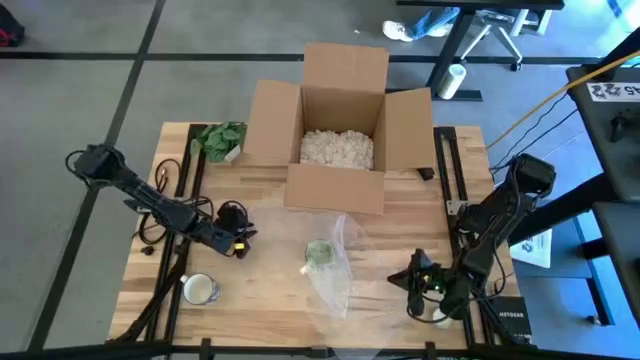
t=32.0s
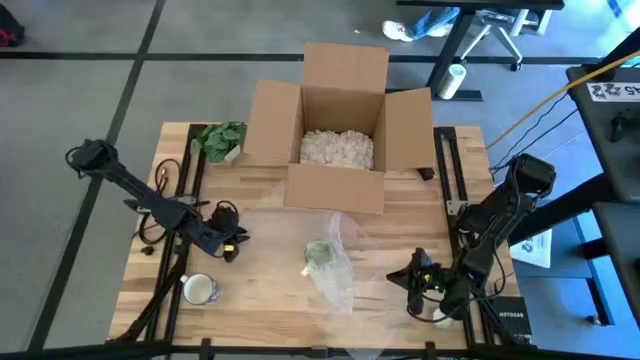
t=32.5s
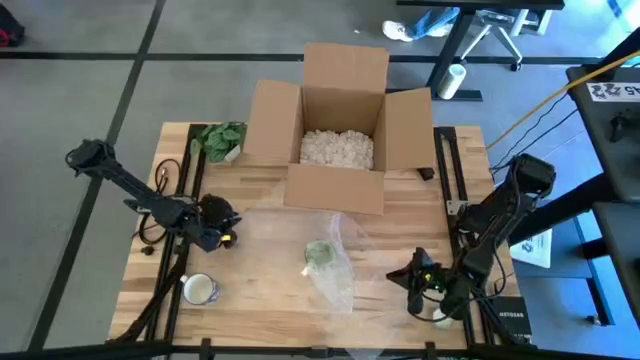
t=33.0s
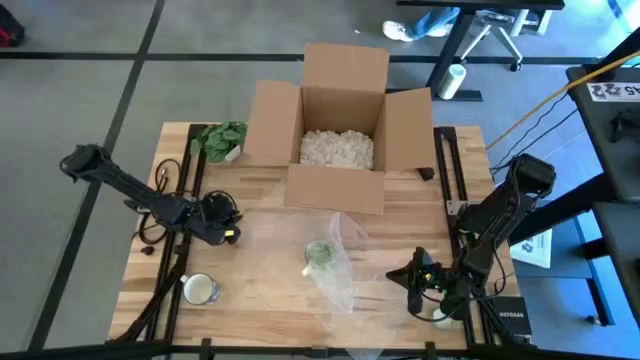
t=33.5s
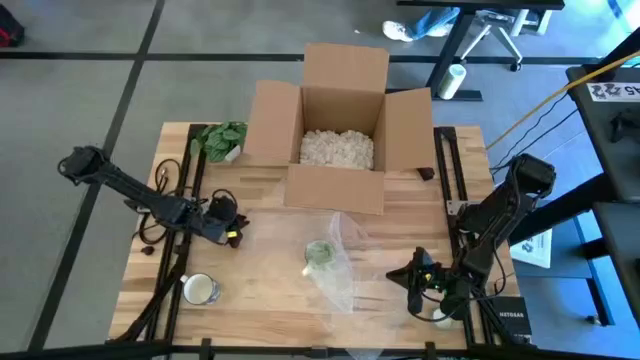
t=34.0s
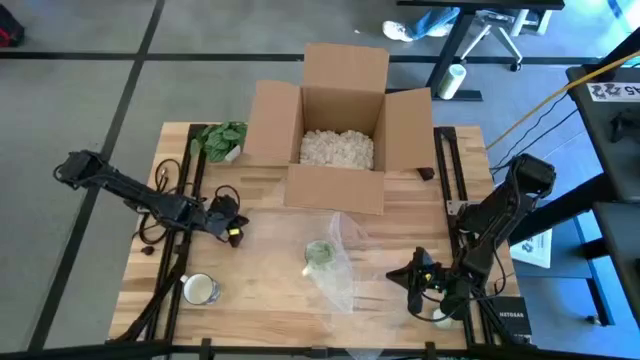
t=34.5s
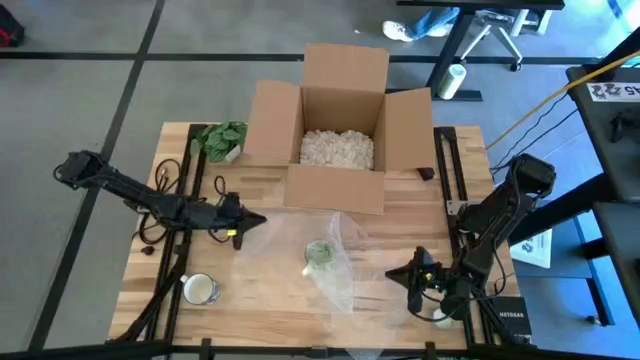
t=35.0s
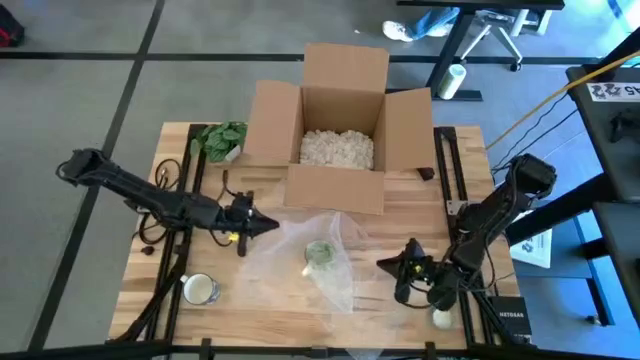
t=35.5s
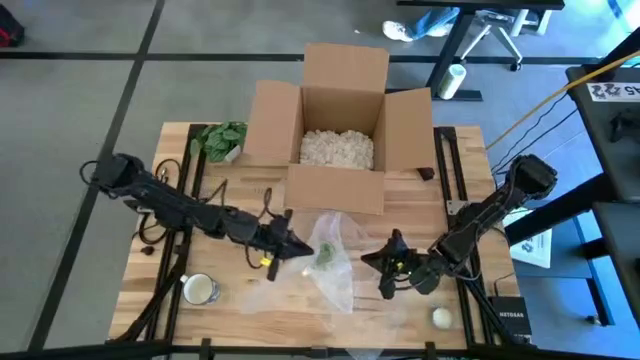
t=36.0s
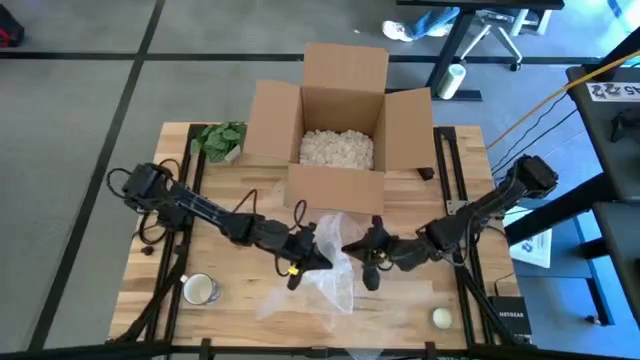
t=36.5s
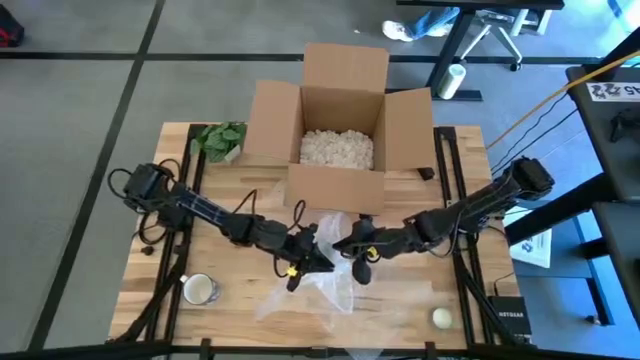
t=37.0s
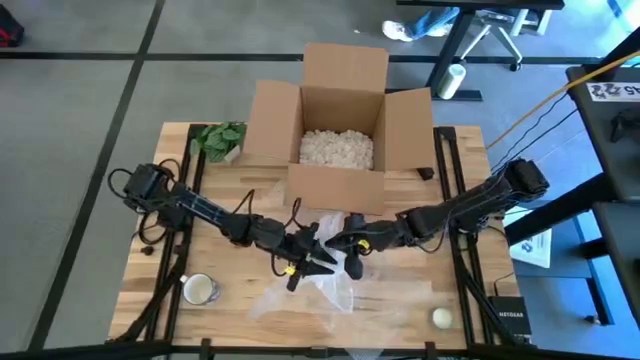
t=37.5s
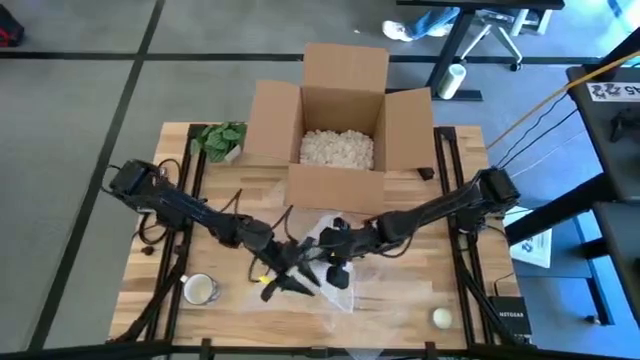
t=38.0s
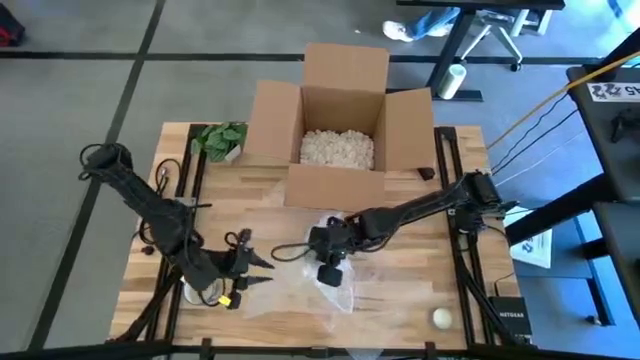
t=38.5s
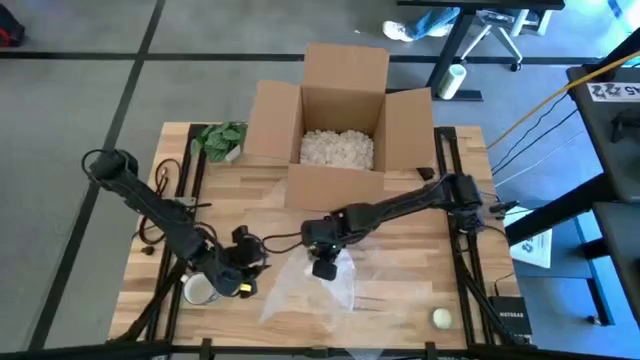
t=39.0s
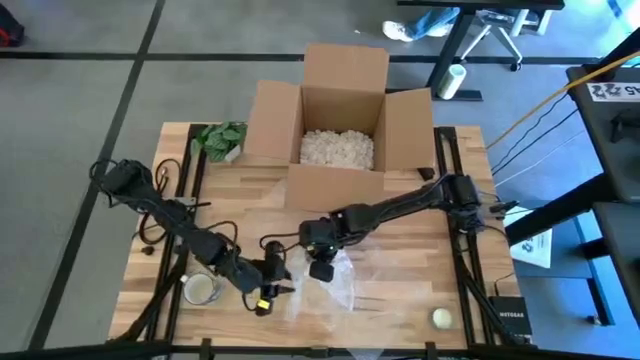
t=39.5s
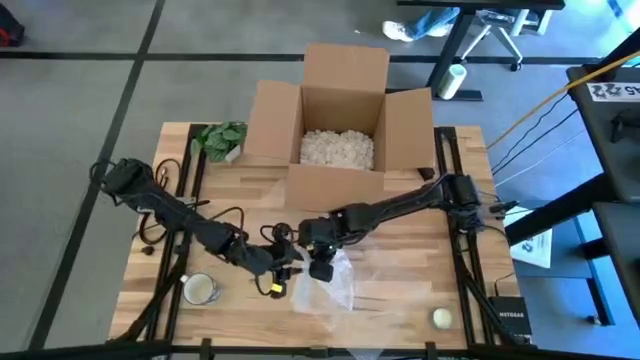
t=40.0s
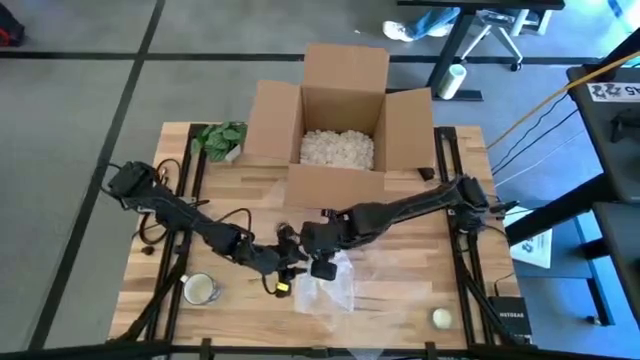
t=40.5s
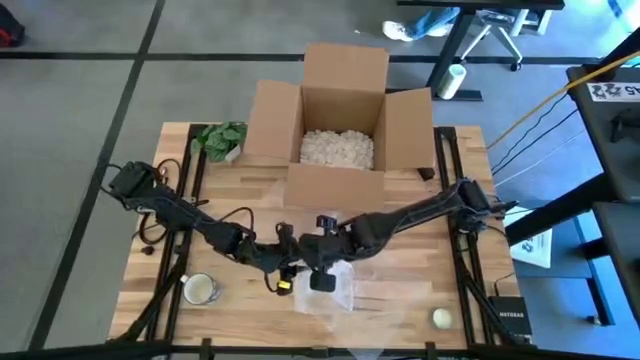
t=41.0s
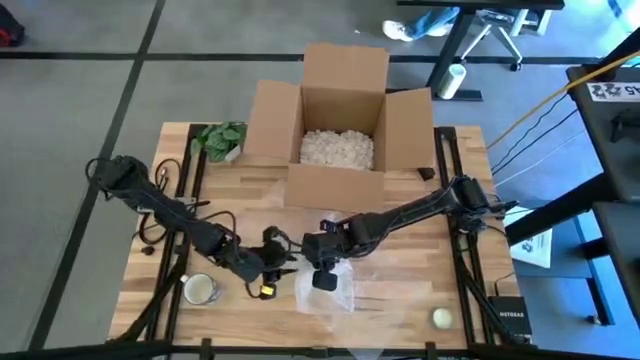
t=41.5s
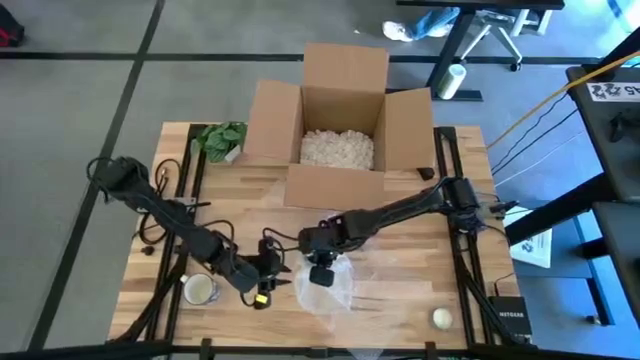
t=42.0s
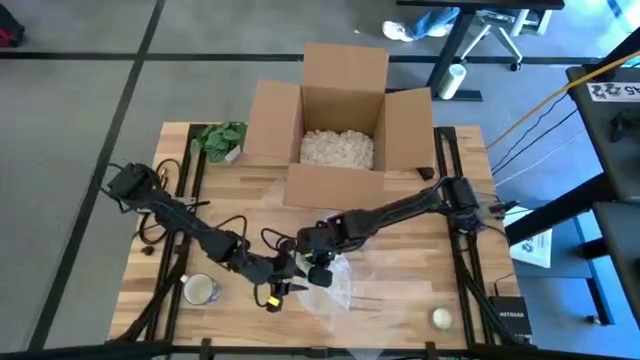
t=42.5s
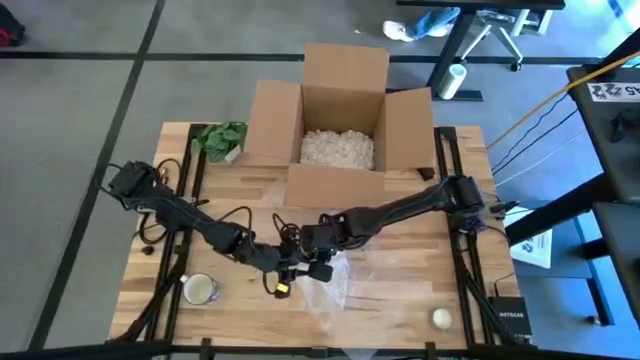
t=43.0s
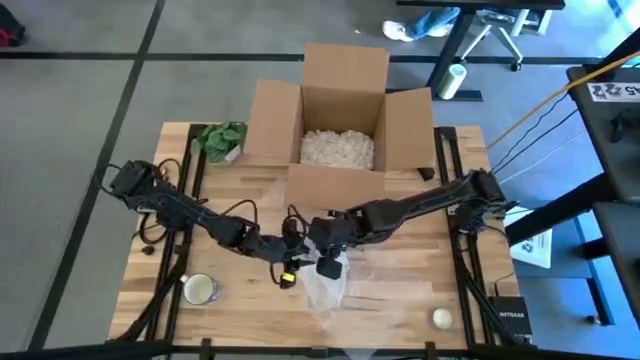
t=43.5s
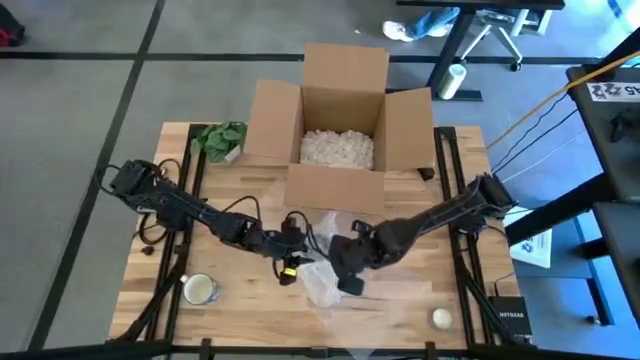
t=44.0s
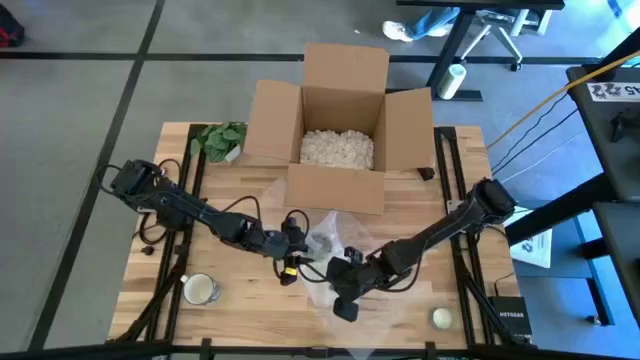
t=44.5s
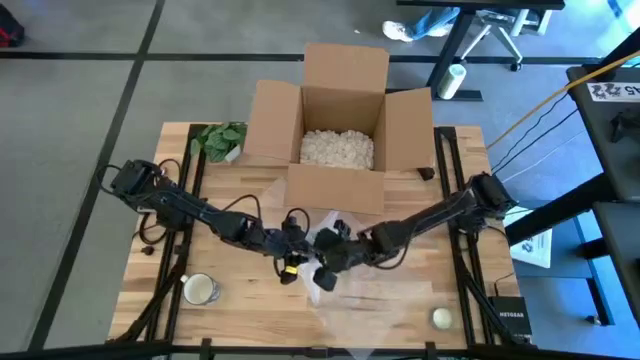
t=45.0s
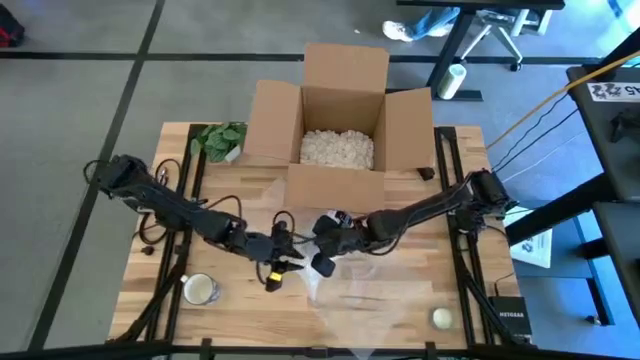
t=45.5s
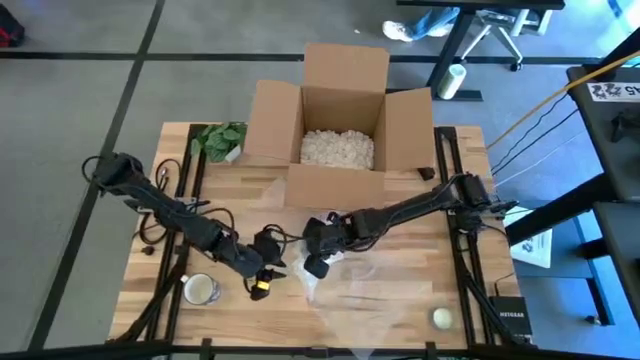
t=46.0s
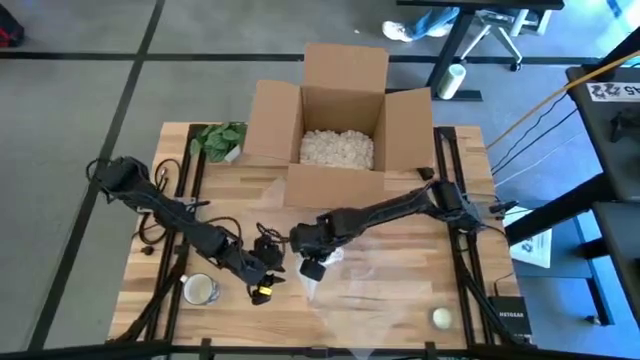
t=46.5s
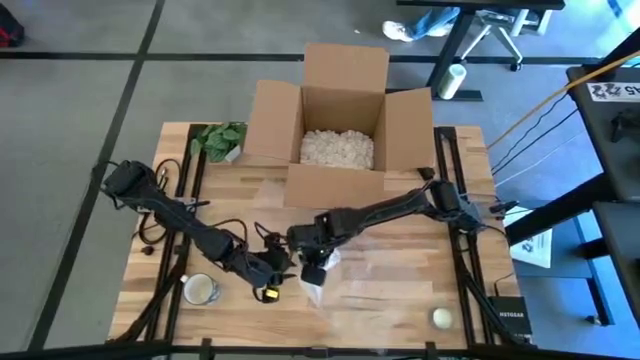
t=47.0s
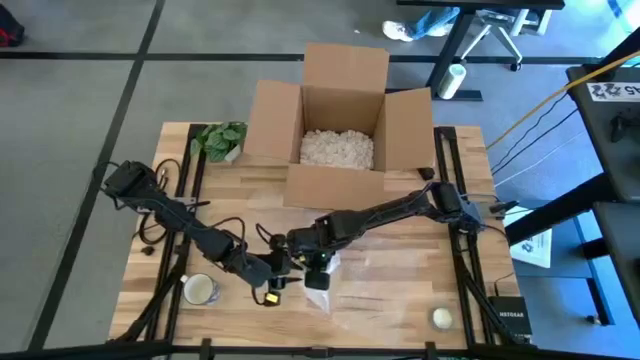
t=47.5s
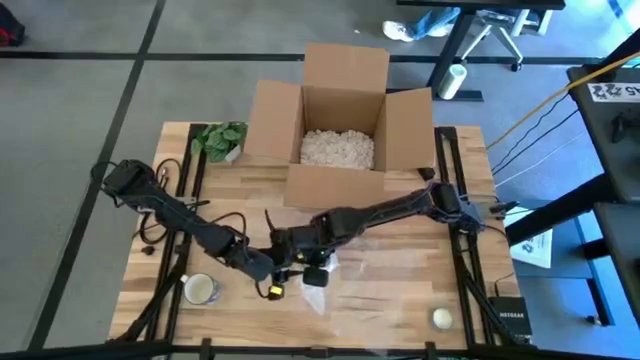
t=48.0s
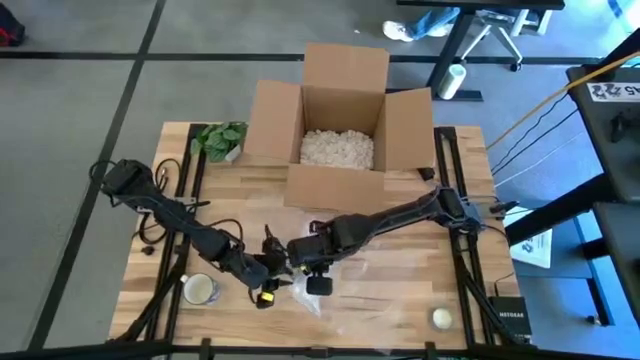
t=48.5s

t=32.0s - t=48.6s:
Task: wrap mug
Wrap the green mug with the bubble wrap

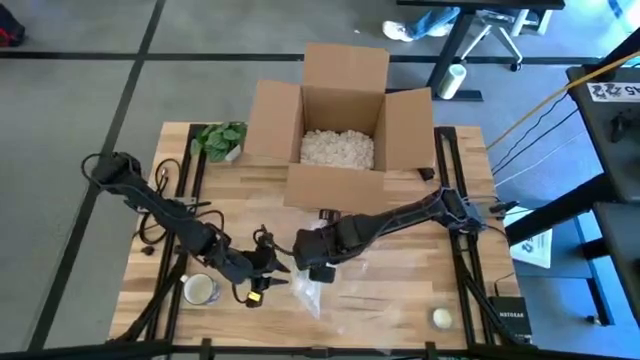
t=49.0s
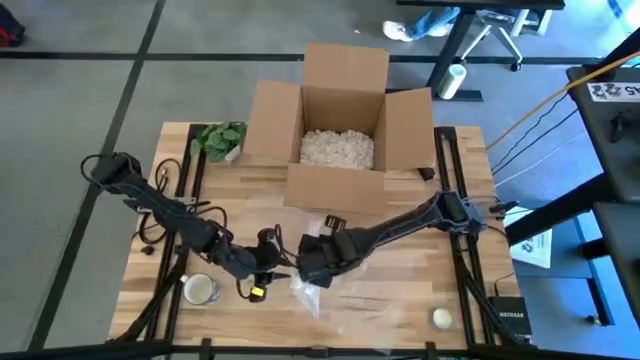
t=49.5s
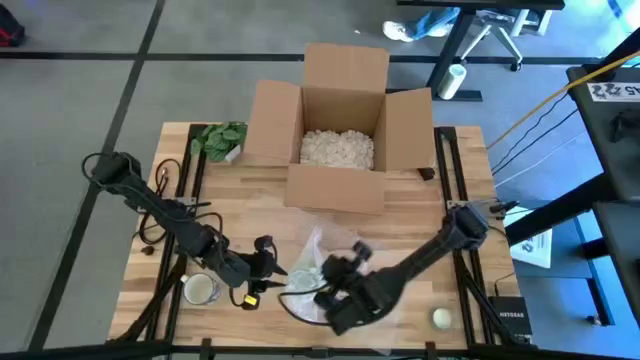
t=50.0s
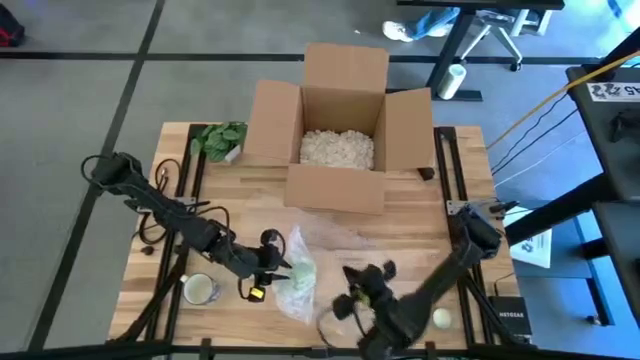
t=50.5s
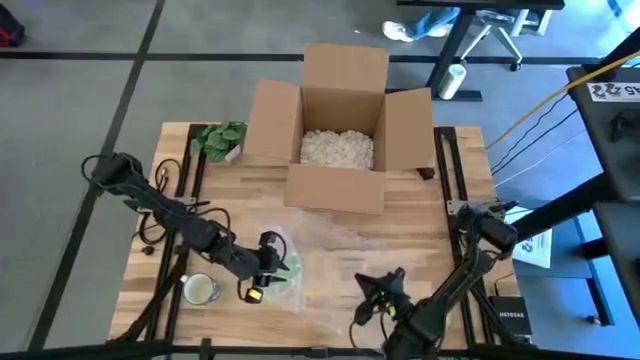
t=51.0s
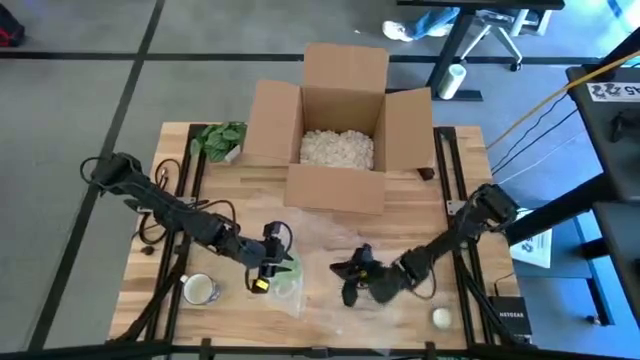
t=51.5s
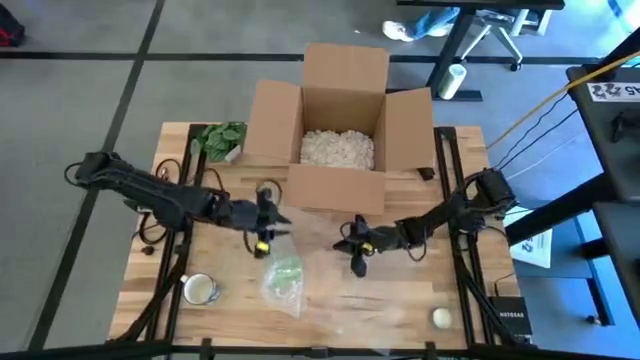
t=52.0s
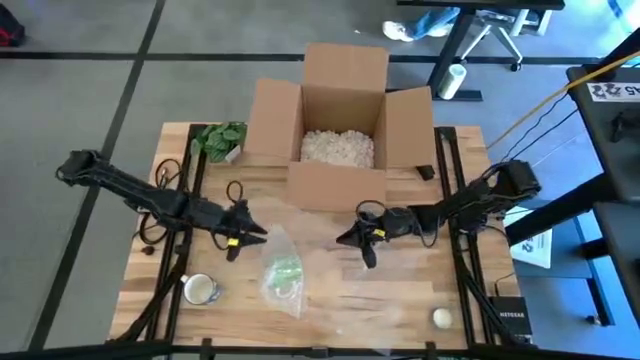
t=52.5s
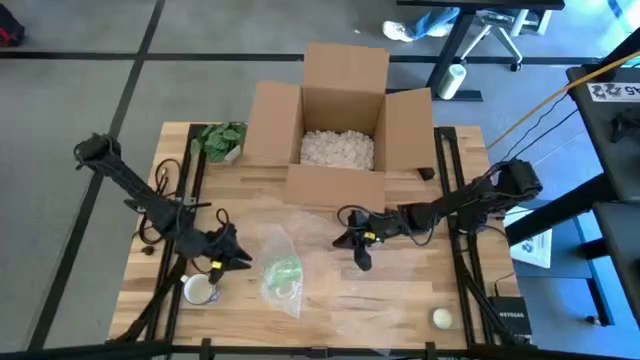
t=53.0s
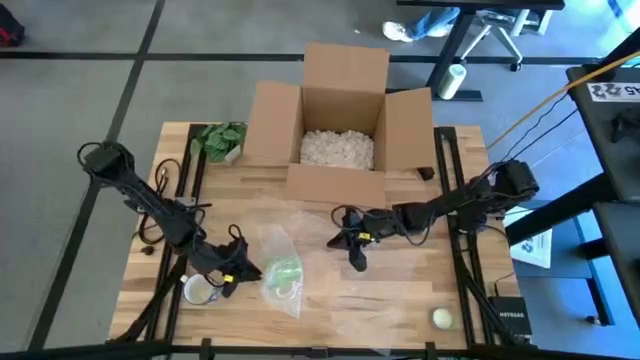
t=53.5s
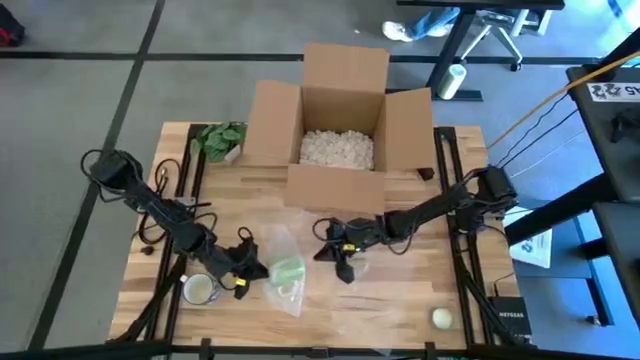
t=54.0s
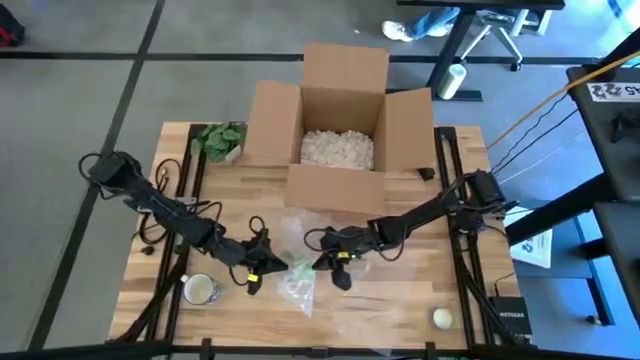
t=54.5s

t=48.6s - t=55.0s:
Wrap the green mug with the bubble wrap
